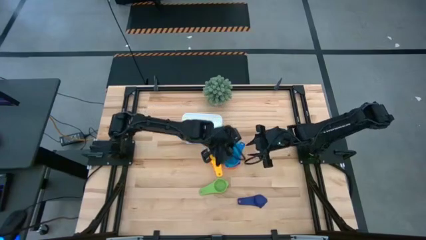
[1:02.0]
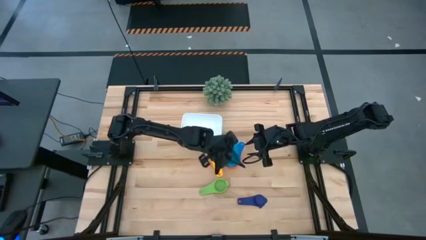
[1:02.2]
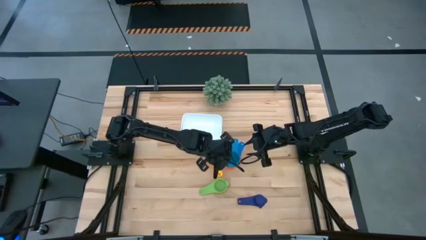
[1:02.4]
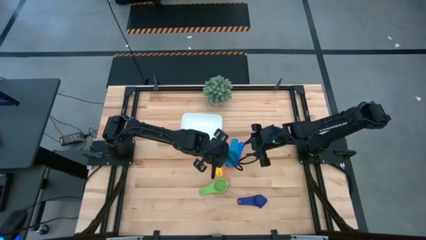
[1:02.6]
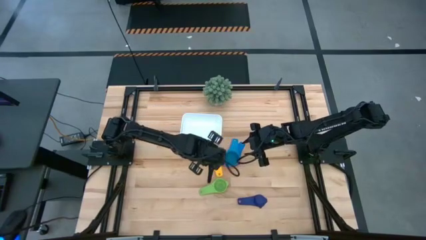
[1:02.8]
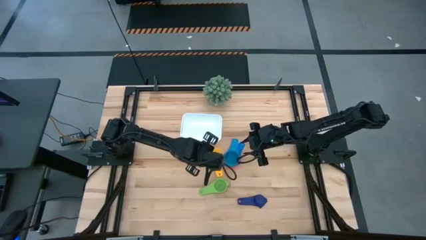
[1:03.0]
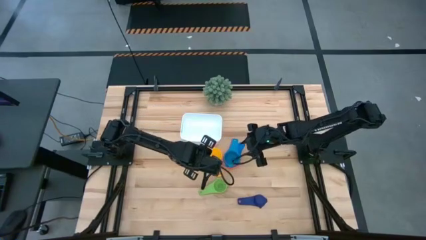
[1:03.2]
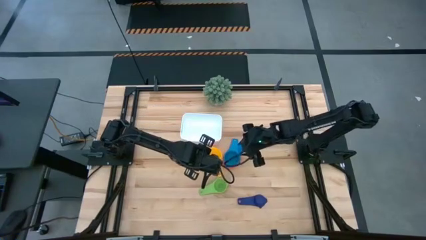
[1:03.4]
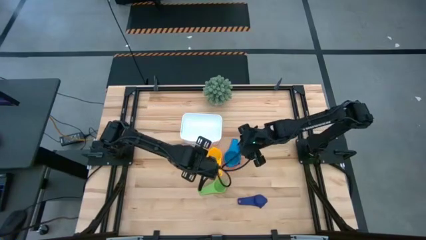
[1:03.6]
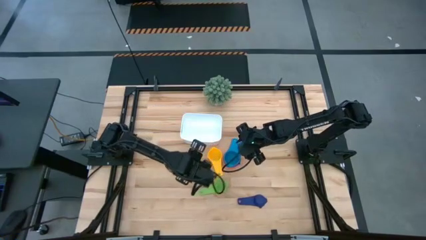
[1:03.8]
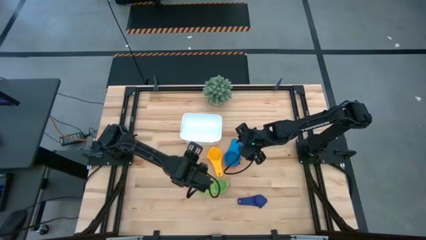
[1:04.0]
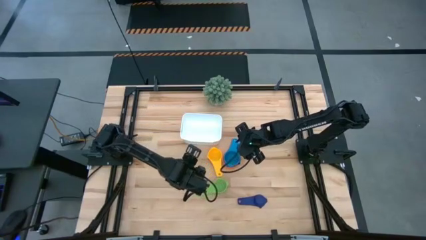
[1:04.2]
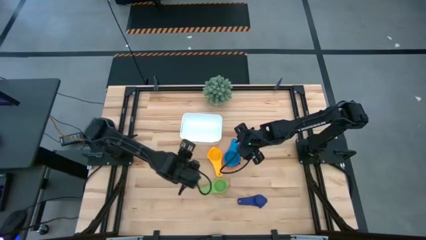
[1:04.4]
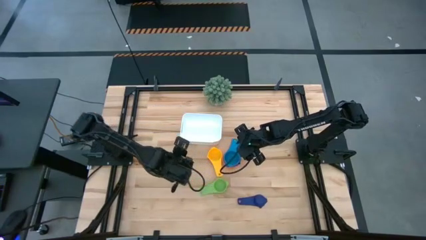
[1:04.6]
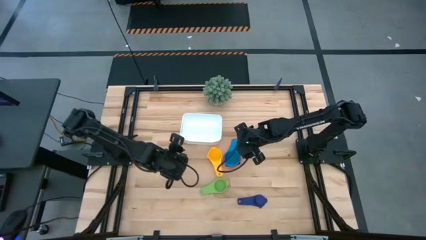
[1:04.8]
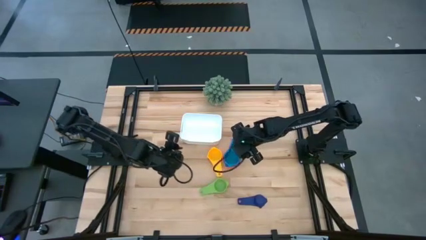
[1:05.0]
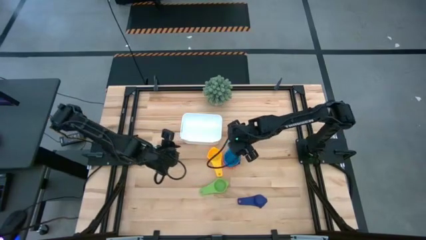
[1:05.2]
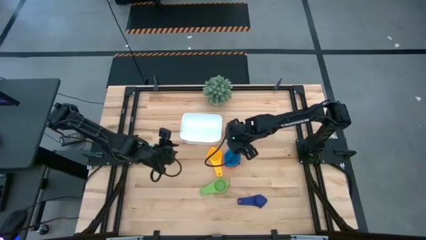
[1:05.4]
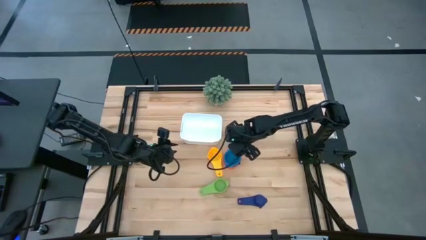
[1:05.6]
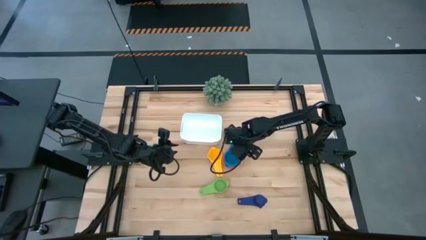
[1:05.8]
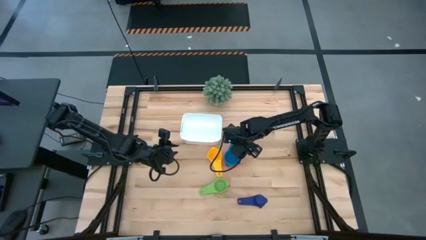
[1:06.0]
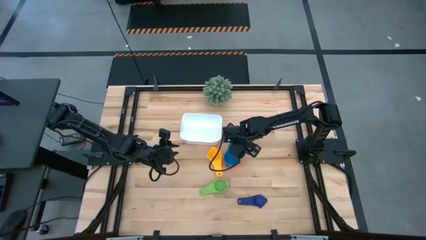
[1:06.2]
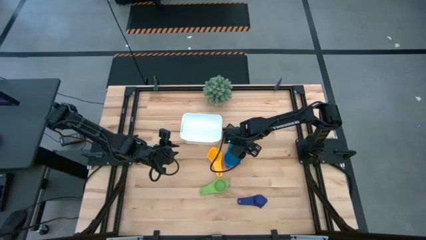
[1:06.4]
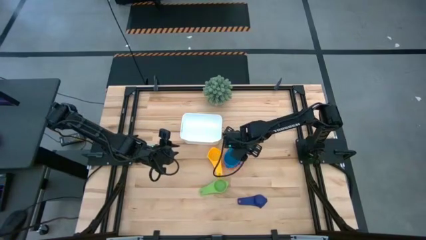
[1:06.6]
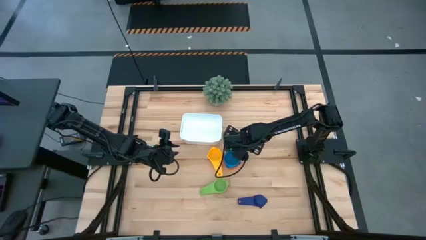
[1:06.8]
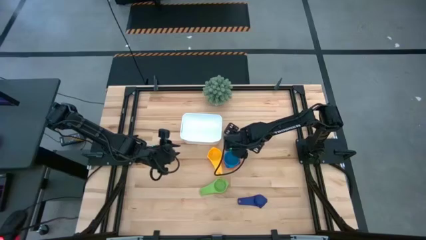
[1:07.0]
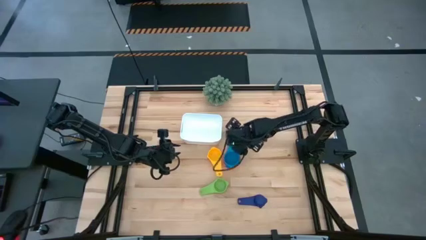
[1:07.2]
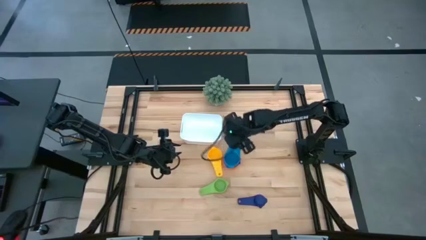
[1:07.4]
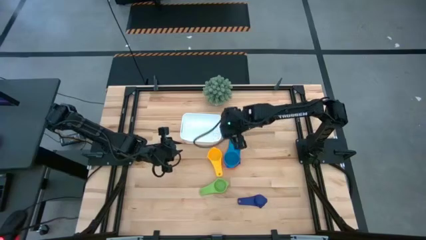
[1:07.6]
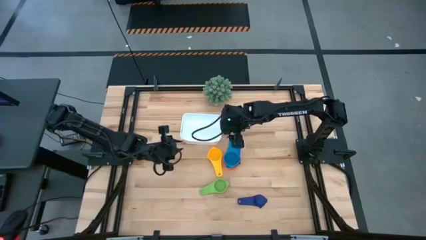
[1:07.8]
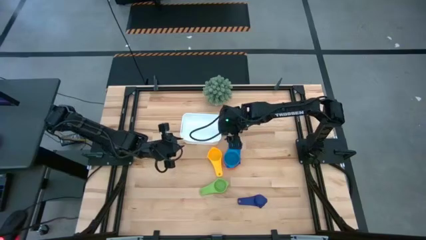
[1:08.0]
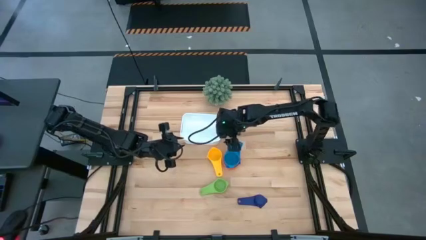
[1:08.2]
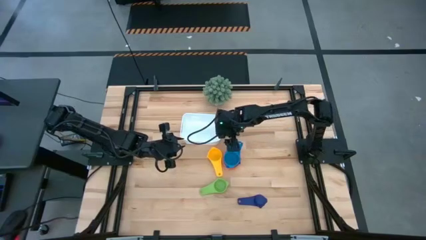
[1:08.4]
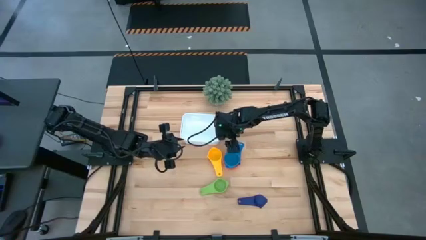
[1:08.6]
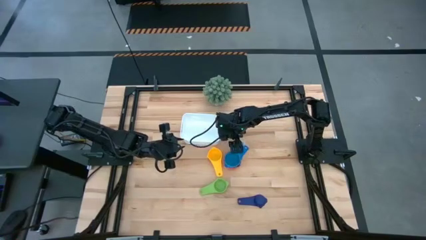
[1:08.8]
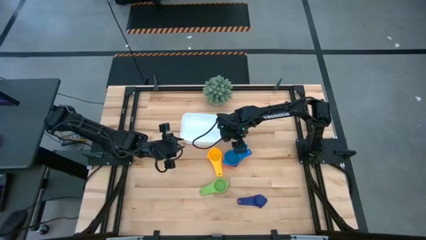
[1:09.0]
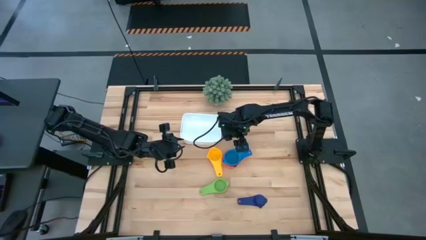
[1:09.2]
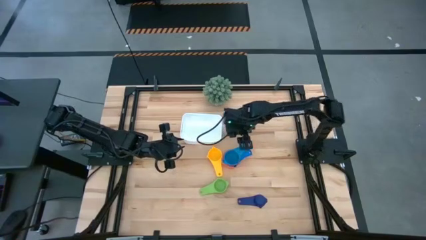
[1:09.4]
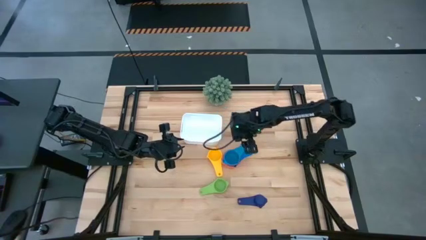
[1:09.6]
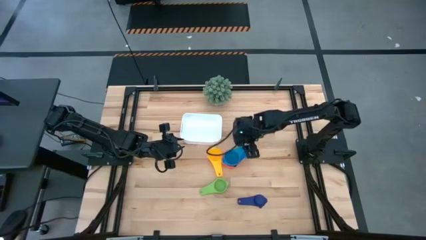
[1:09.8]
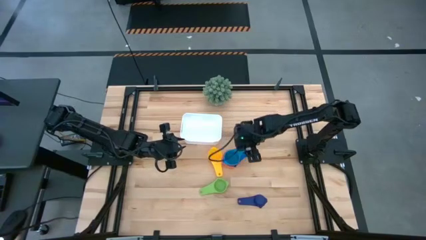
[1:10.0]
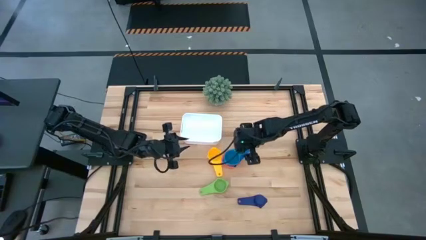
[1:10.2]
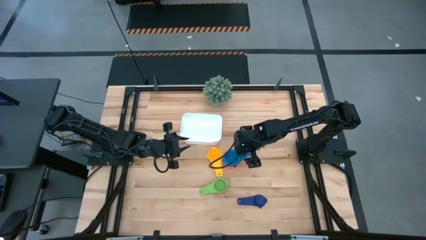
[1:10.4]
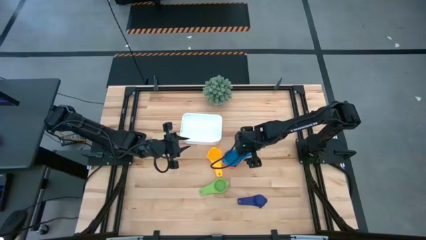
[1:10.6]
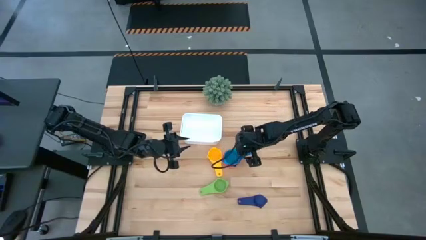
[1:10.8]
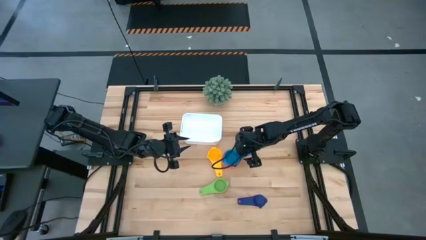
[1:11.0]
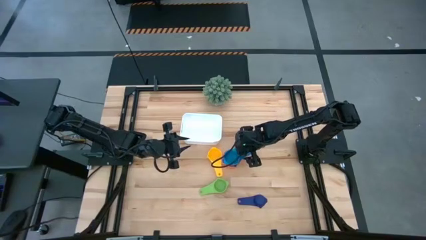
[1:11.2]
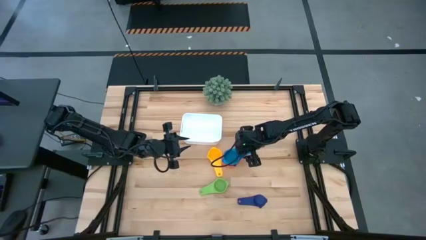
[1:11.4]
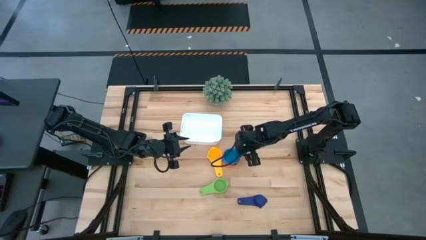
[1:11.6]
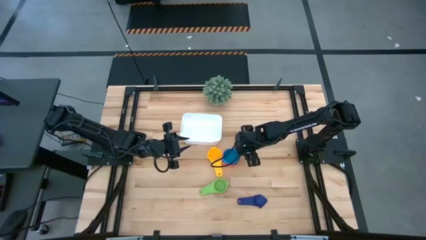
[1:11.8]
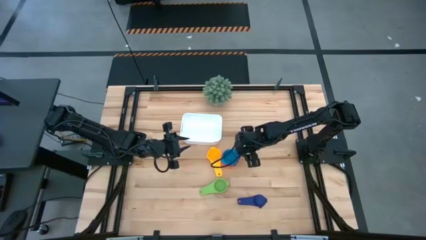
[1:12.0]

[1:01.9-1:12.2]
Task: Nest measuring cups in basket
Stack the left stacked nesting cups on the right stacked nesting cup

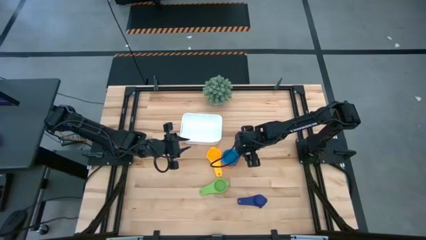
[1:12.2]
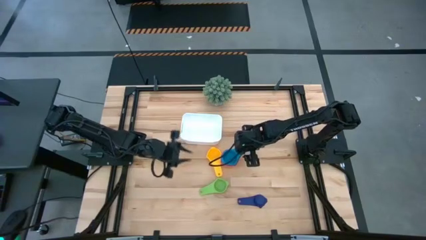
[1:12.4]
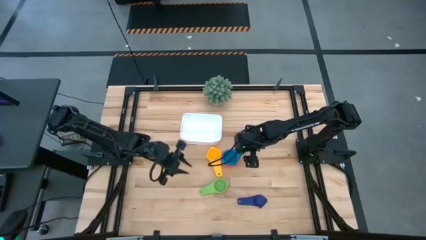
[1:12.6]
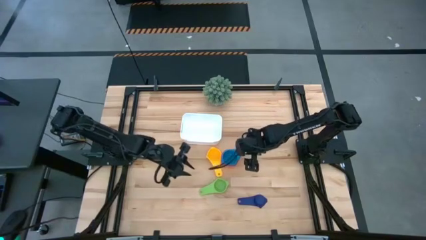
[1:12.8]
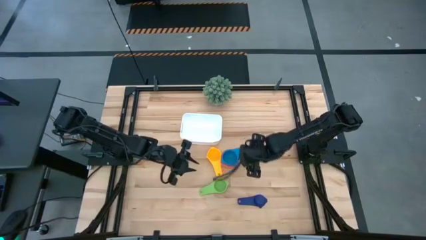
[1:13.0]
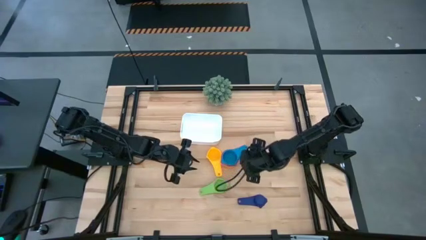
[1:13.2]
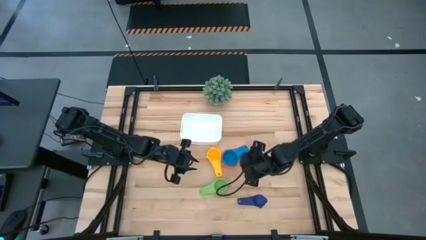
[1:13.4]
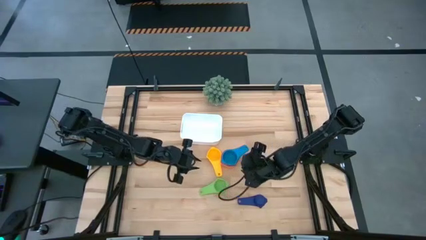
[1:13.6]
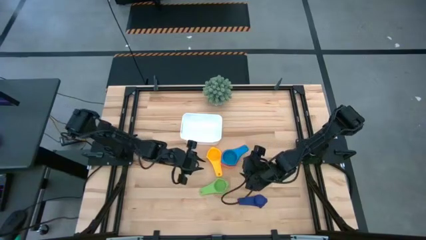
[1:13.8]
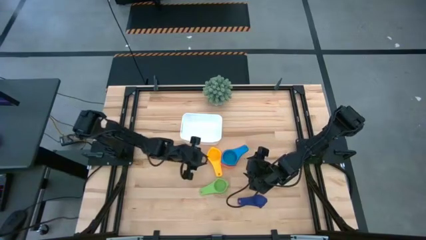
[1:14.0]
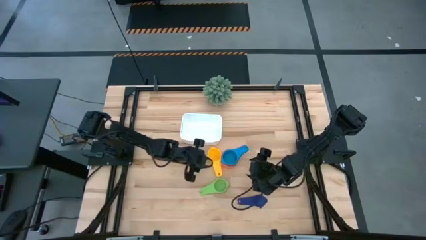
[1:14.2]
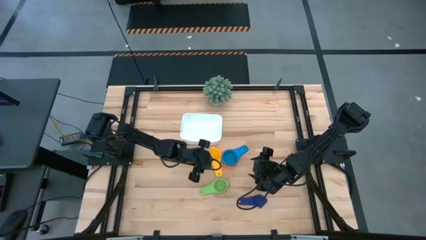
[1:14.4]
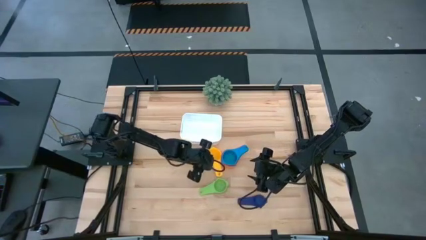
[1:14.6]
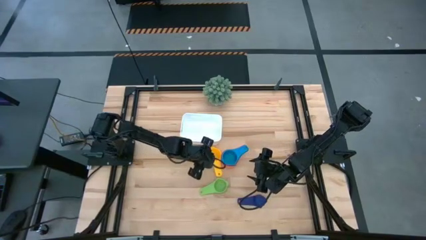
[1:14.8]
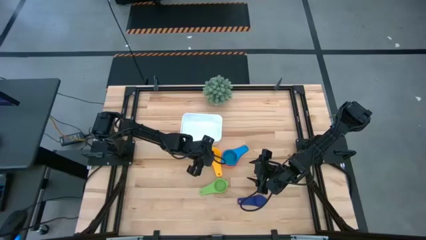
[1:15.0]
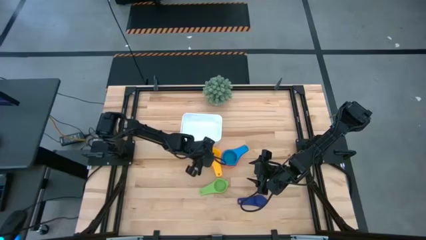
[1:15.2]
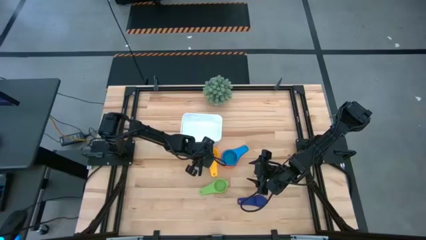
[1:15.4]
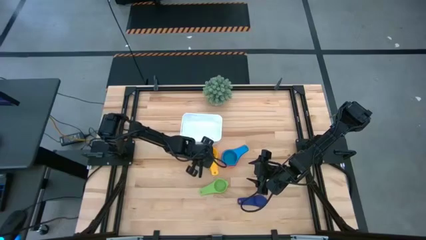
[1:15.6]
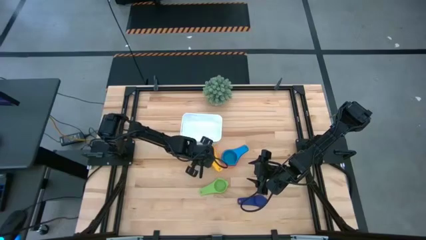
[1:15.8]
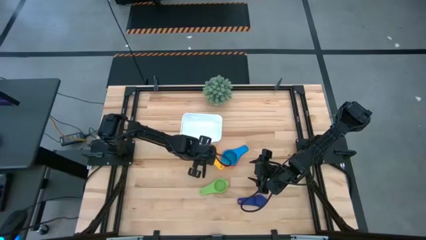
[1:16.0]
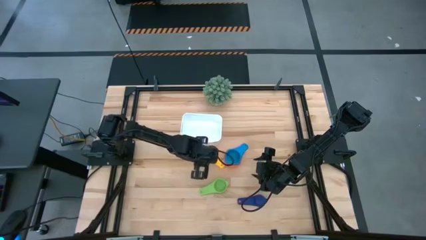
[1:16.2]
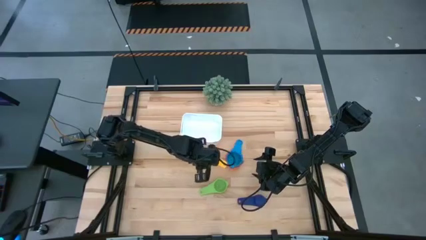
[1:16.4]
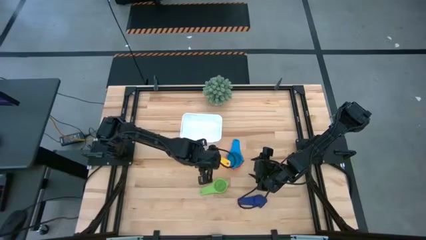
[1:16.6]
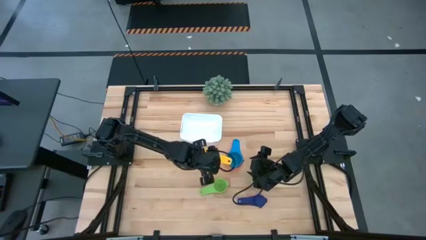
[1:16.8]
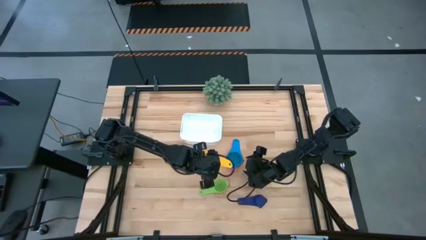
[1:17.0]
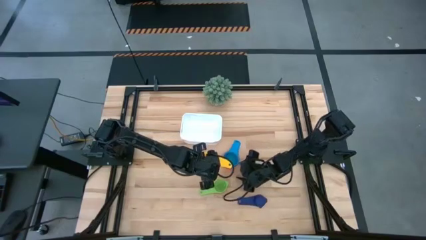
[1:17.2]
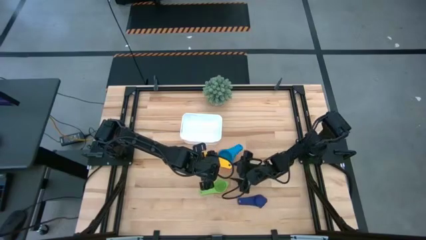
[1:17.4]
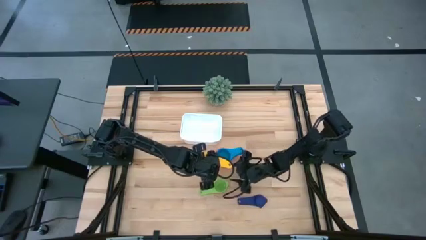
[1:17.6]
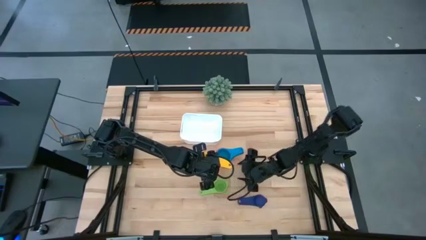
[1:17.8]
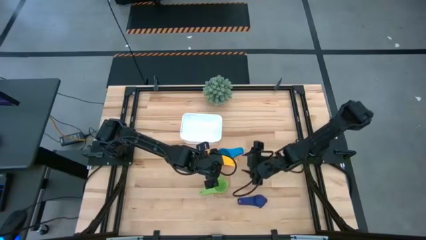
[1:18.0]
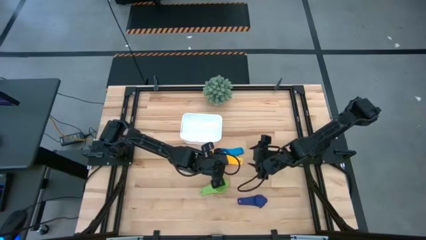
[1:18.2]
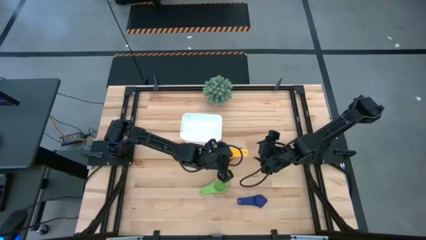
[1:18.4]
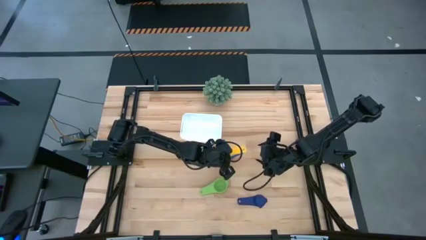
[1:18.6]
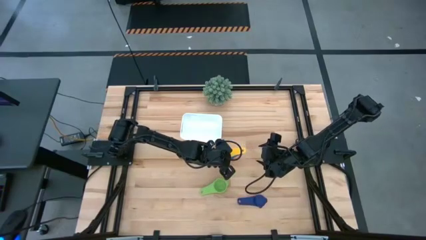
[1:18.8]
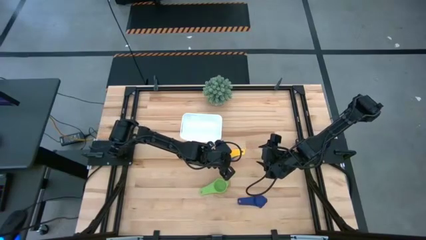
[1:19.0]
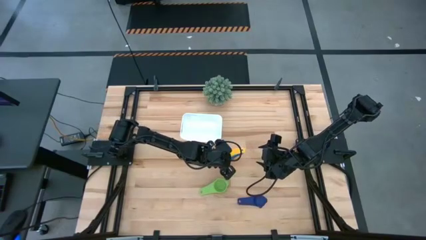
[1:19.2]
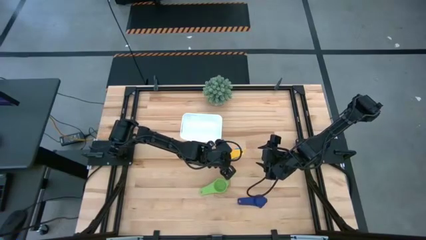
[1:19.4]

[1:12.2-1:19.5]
Stack the yellow nesting cup on the blue nesting cup
